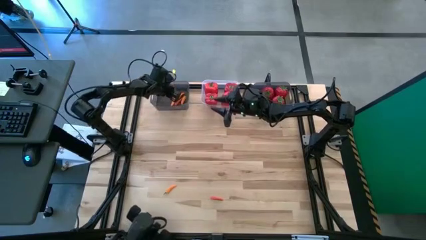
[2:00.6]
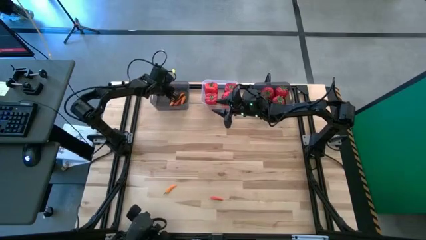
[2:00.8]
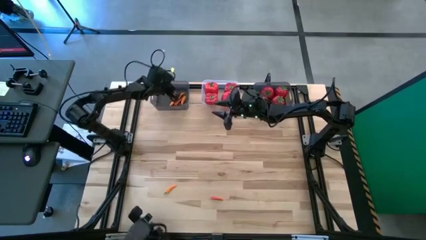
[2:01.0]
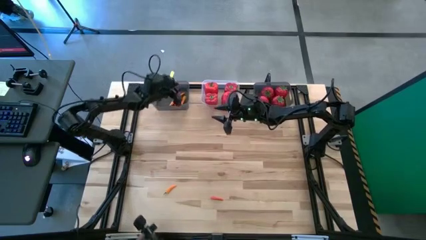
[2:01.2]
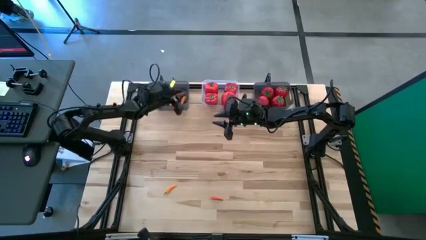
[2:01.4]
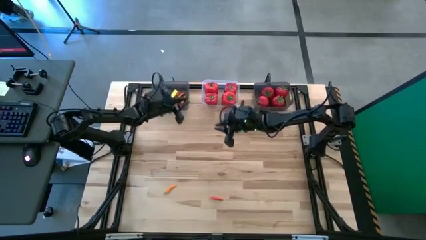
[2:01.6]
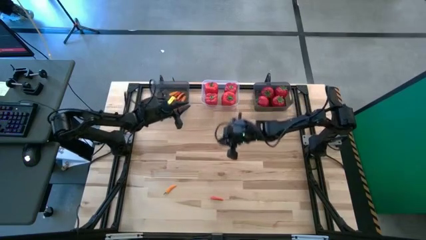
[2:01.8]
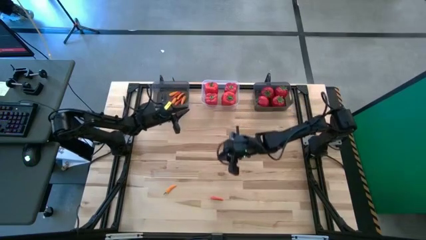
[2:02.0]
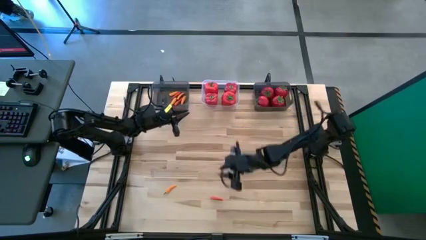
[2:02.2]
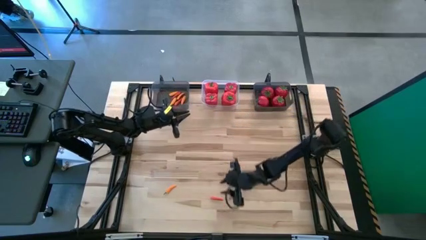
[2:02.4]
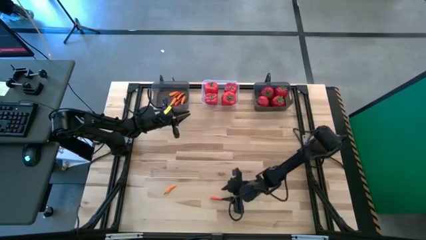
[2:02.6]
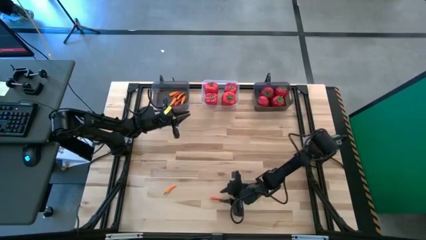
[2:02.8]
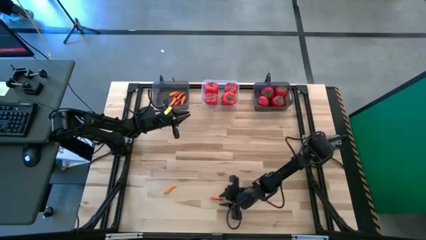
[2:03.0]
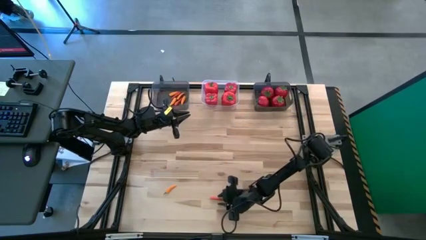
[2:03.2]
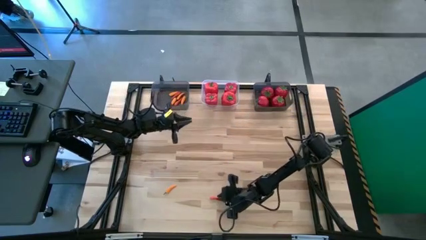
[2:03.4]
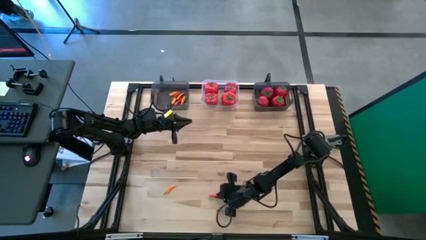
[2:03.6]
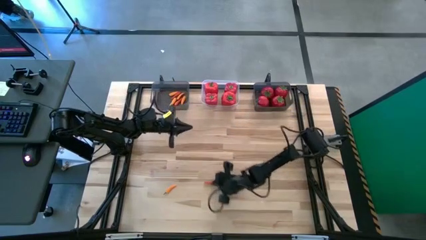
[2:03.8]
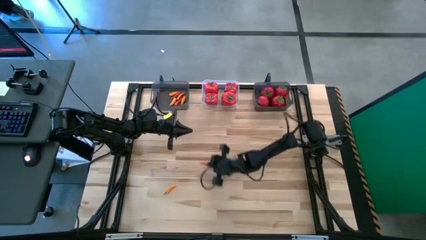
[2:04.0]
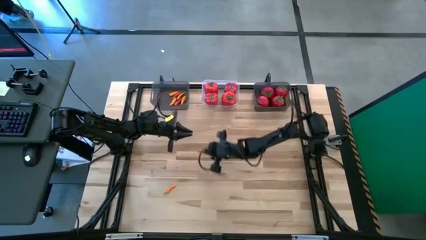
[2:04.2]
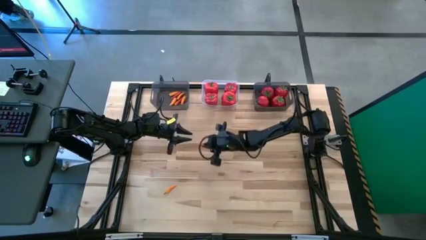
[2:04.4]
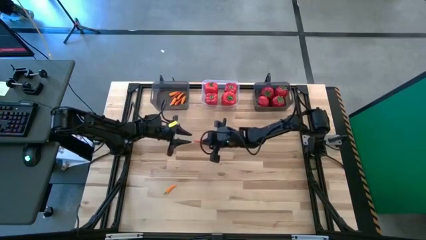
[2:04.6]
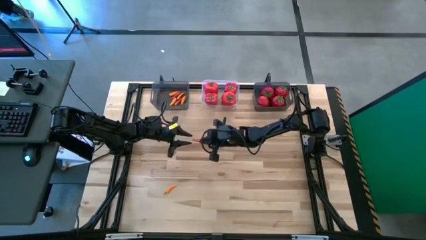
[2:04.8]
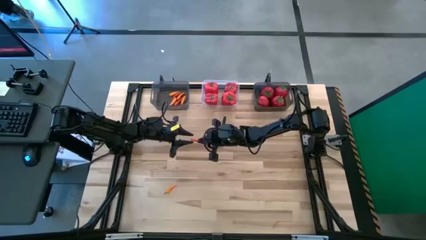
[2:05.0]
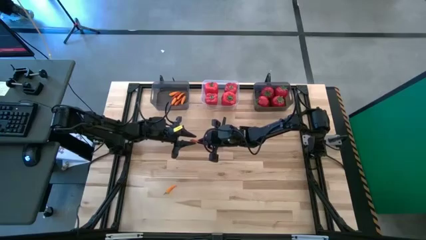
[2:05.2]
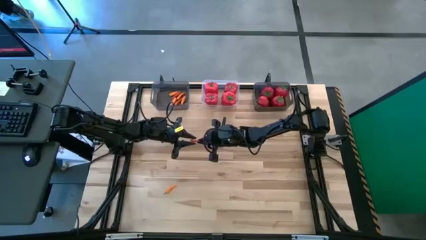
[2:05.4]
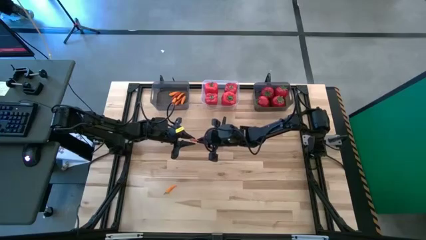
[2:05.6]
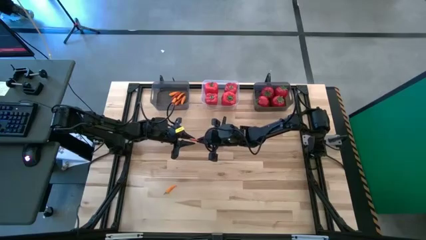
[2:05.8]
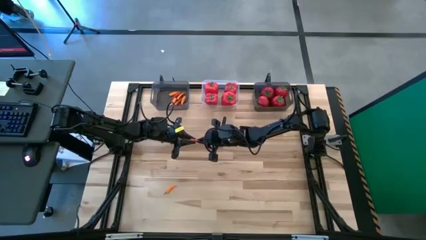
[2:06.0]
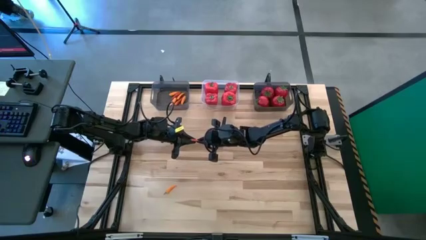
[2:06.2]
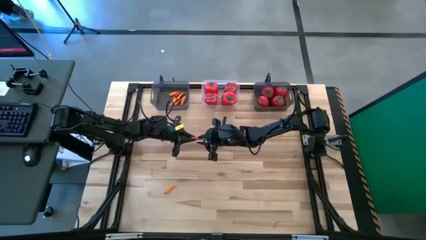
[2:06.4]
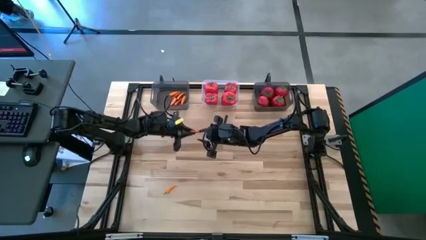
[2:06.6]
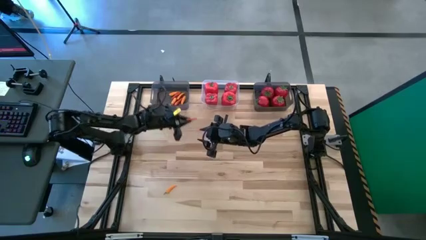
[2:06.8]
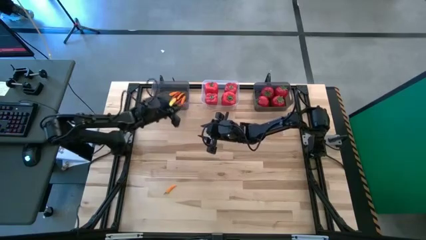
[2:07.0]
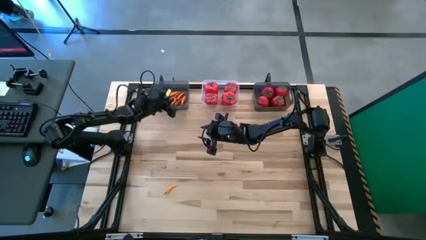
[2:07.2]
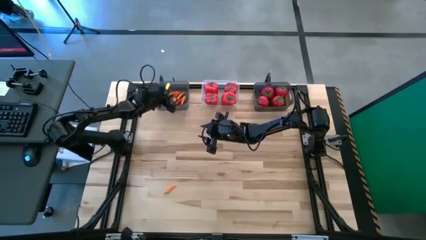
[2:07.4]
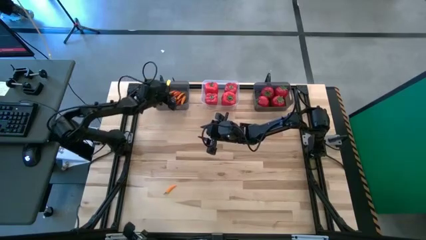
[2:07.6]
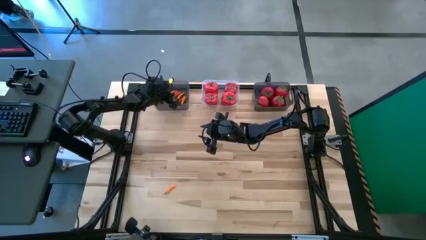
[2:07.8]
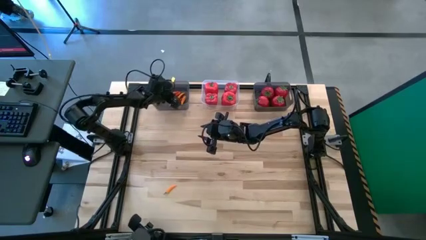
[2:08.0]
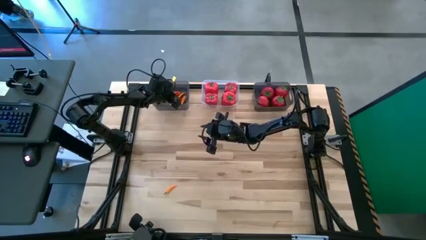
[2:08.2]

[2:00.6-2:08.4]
Task: Sort produce into baskets
Put the orange chili pepper into the left black bin

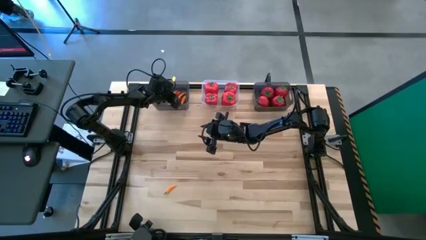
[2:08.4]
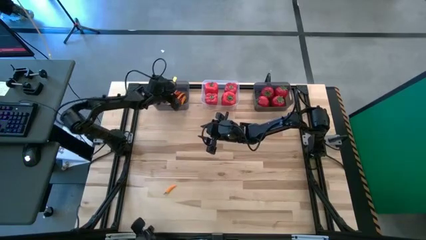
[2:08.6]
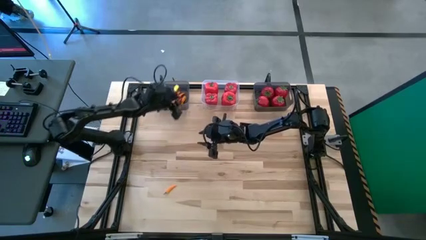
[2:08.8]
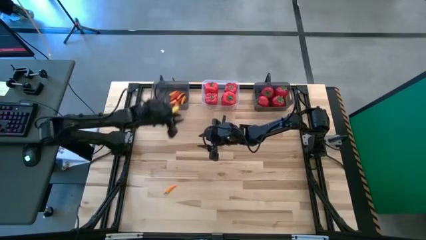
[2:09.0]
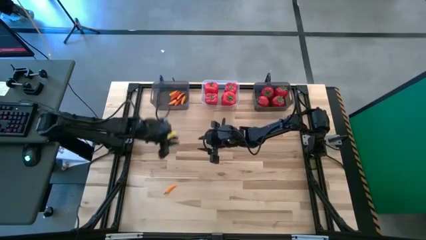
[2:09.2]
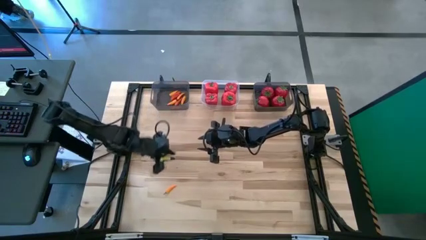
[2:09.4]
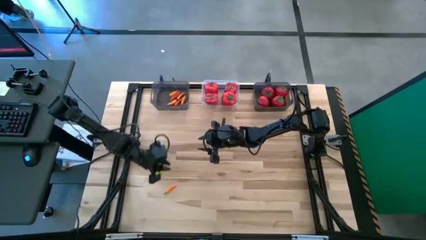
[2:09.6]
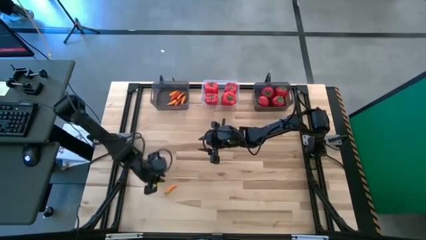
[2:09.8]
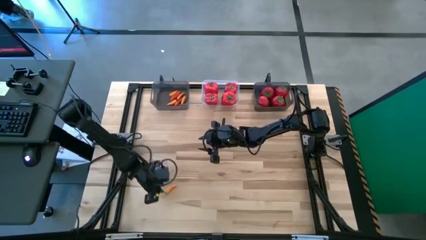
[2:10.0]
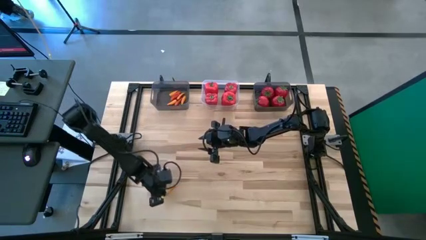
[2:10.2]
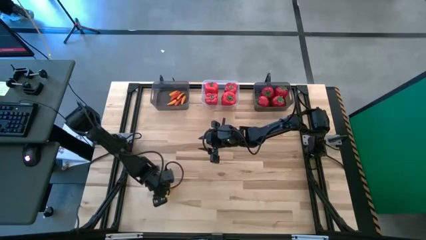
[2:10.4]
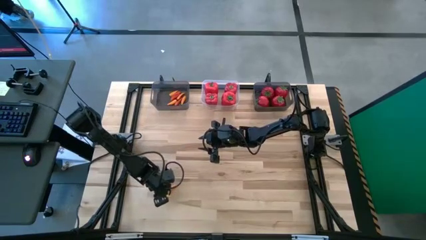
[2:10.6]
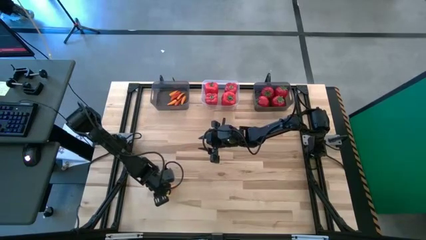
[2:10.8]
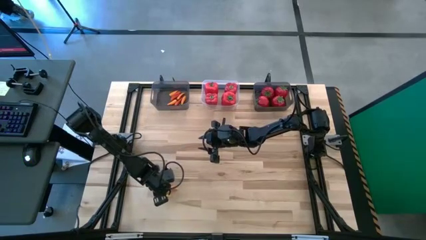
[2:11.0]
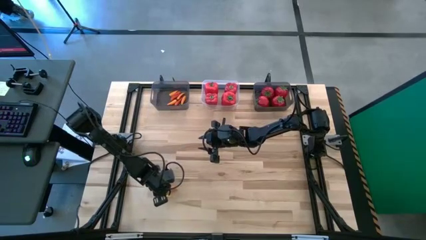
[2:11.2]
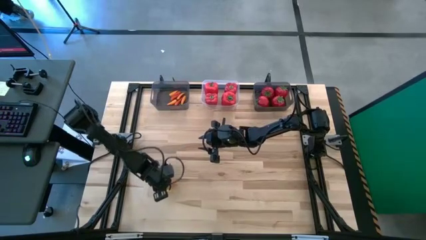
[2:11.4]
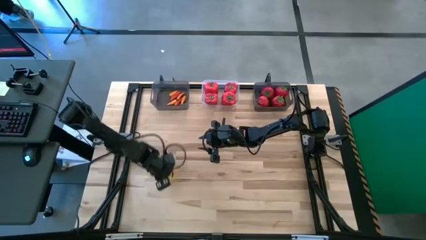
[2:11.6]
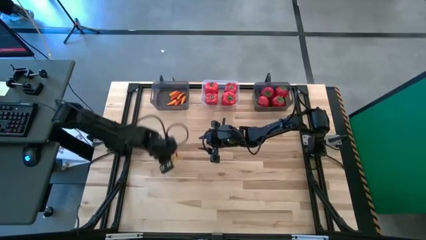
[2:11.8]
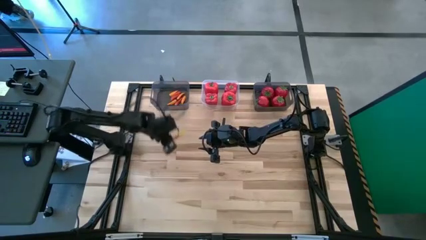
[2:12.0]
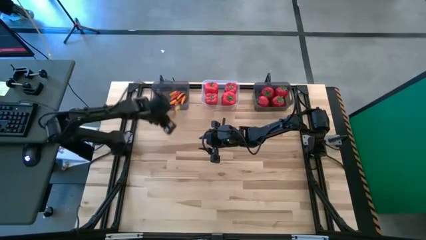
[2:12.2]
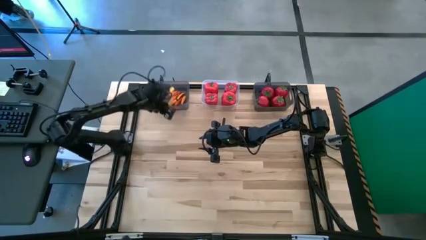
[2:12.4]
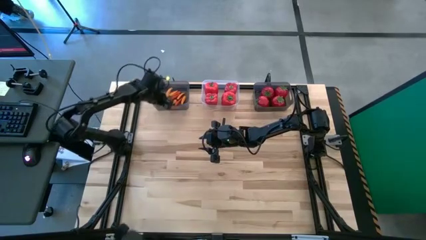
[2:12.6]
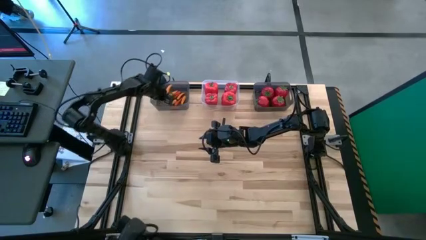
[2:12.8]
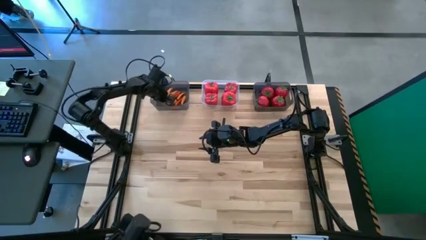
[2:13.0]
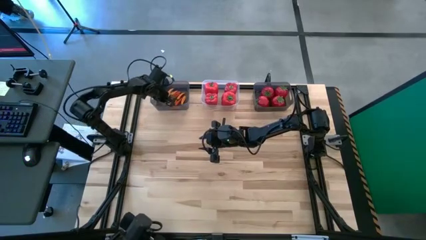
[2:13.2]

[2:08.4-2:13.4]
Put the yellow chili pepper into the left black bin

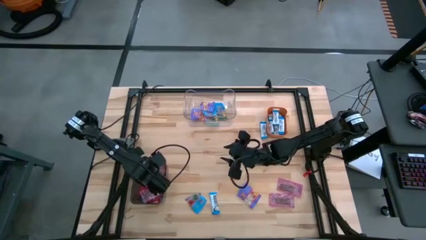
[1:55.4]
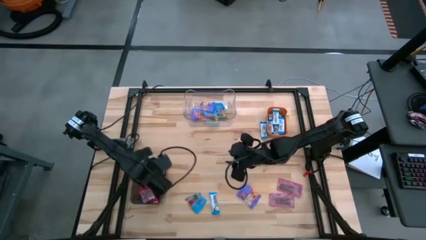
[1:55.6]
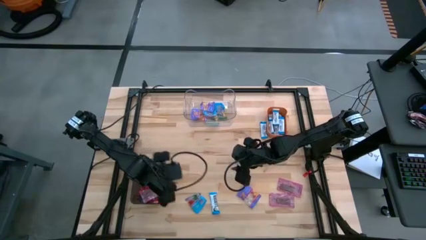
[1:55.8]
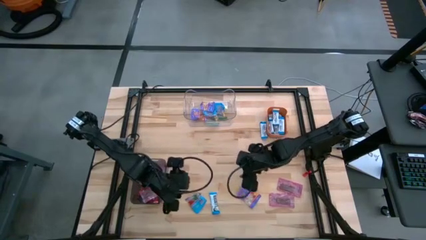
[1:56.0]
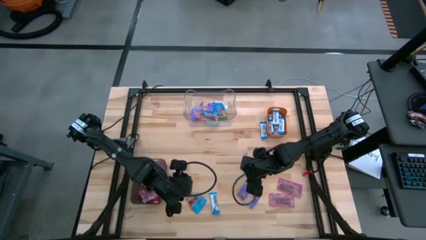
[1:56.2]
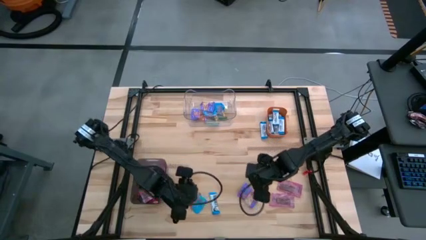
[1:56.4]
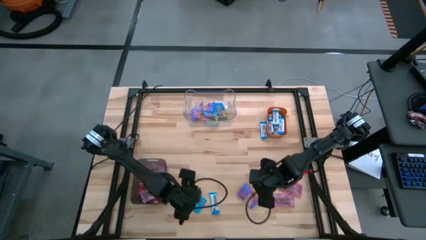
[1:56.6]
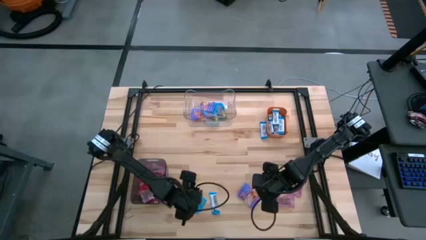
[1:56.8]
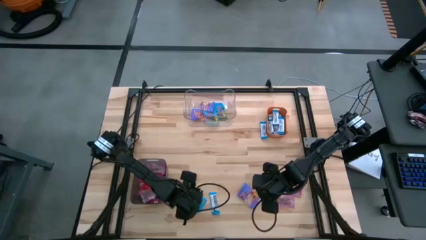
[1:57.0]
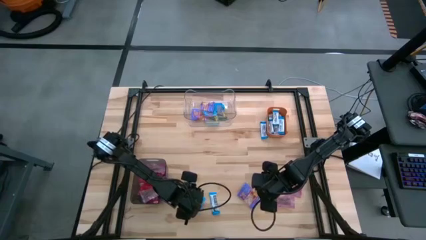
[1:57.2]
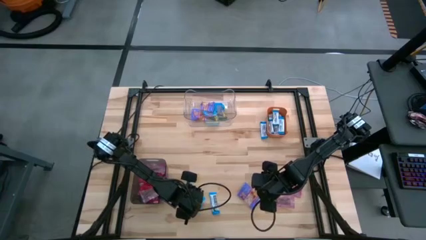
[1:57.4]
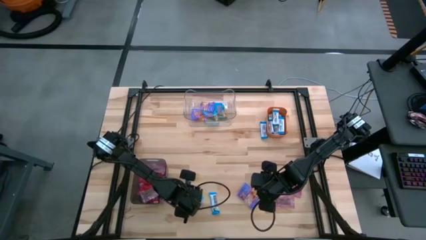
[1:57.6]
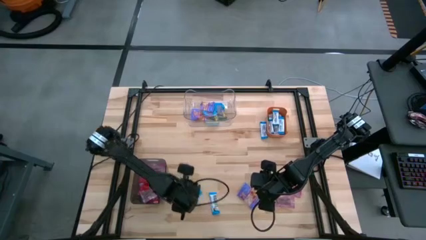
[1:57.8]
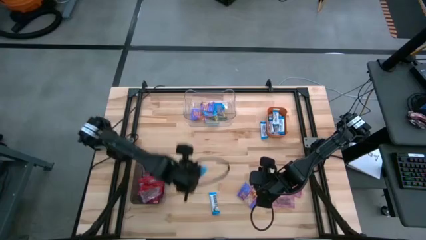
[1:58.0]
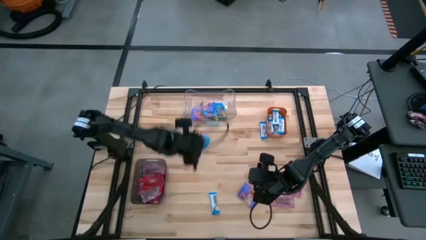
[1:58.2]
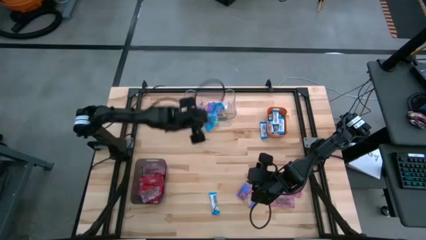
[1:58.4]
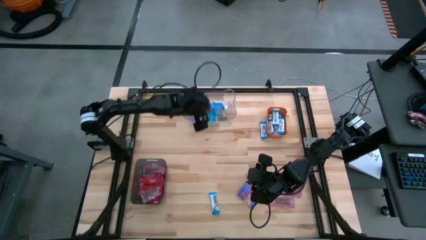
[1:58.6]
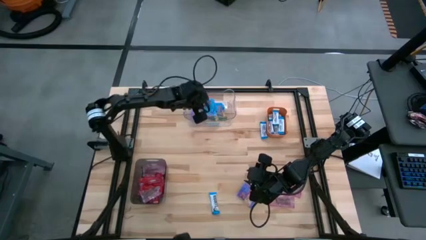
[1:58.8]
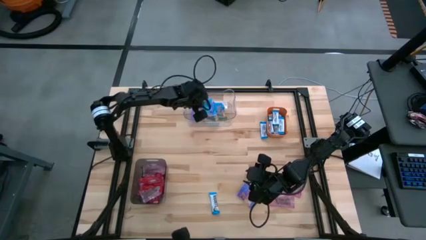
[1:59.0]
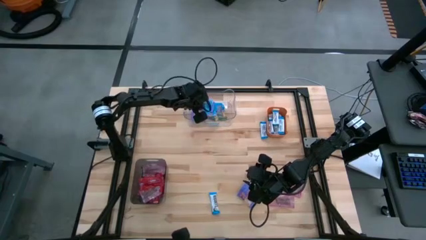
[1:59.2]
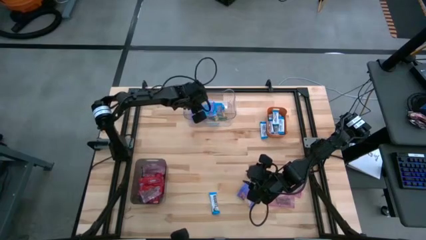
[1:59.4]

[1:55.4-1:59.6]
Task: Sort candy
Put the light blue gummy into the transparent bin
